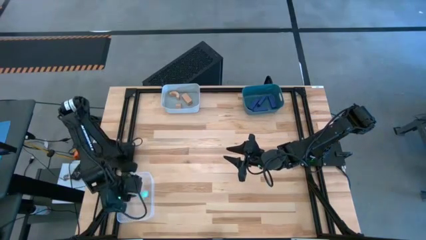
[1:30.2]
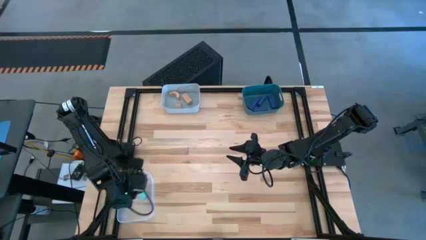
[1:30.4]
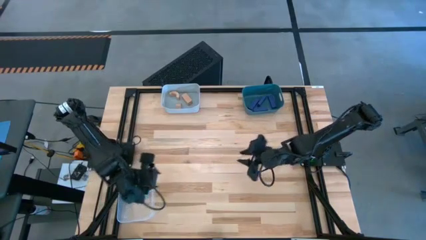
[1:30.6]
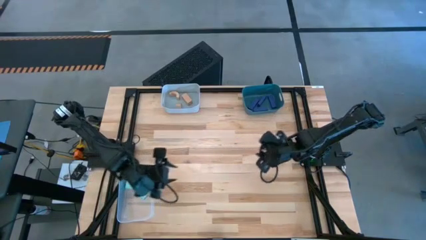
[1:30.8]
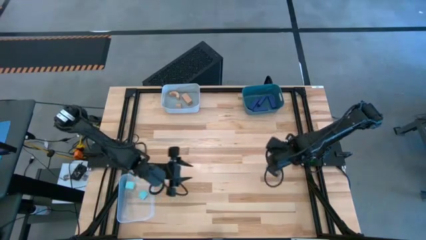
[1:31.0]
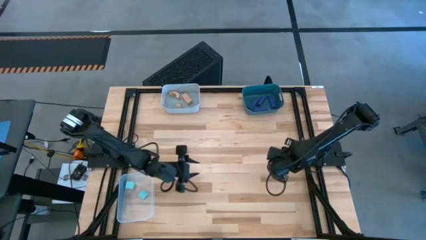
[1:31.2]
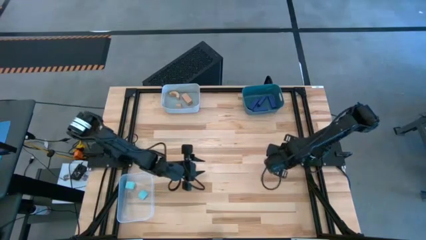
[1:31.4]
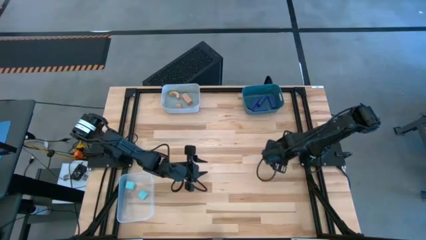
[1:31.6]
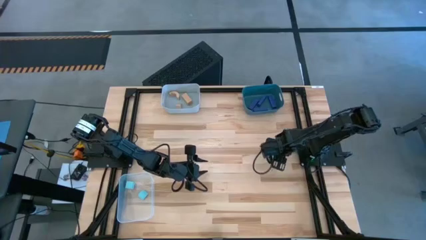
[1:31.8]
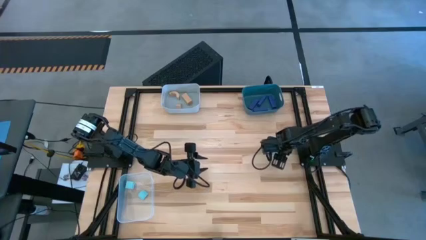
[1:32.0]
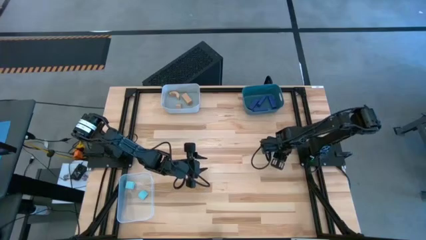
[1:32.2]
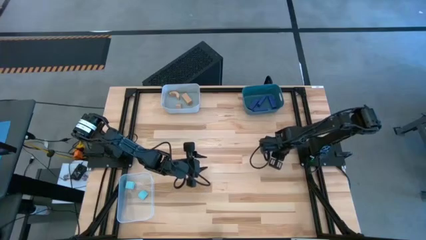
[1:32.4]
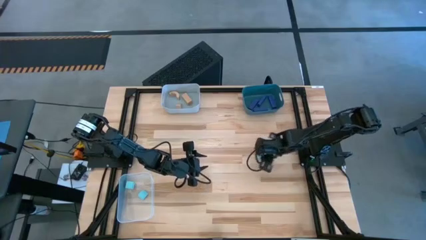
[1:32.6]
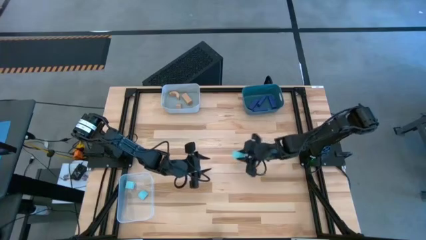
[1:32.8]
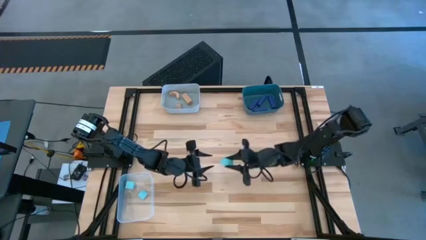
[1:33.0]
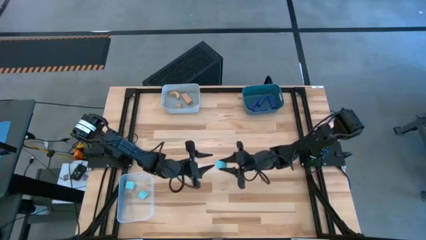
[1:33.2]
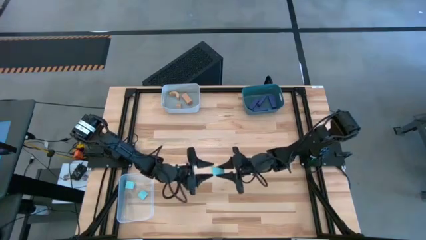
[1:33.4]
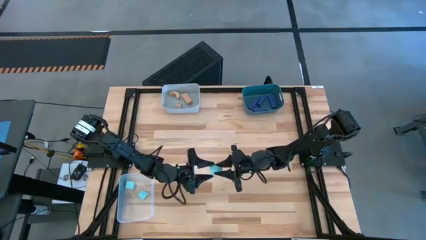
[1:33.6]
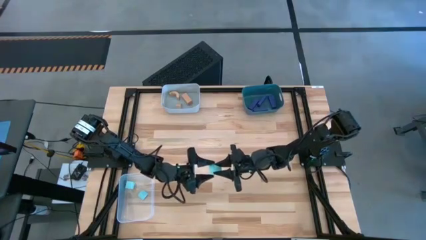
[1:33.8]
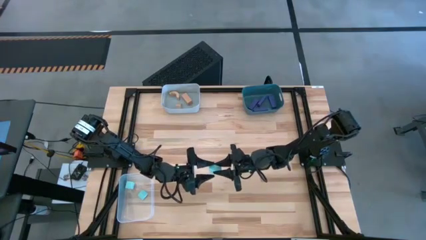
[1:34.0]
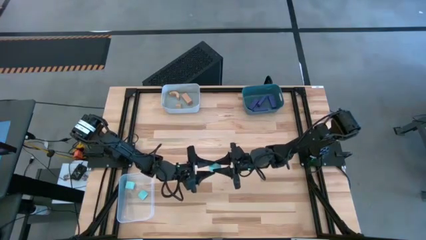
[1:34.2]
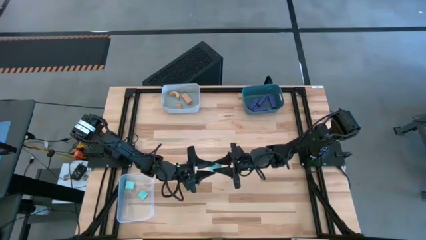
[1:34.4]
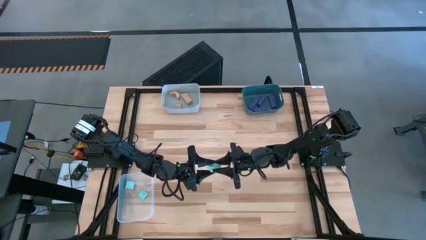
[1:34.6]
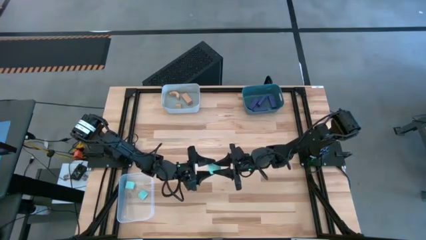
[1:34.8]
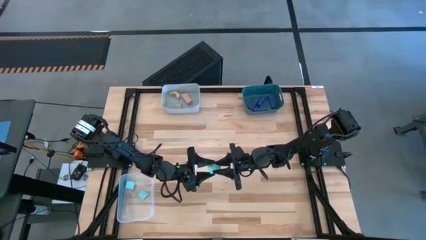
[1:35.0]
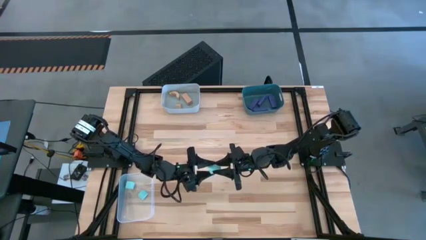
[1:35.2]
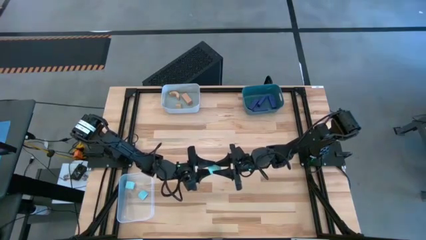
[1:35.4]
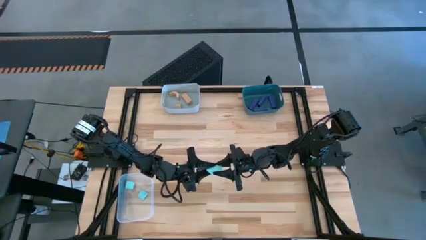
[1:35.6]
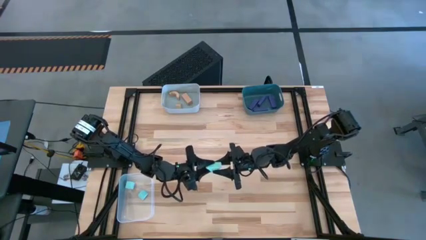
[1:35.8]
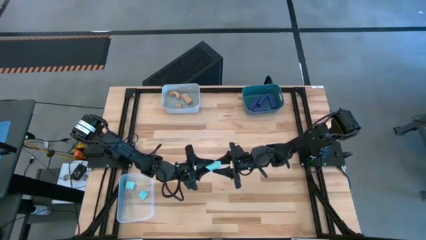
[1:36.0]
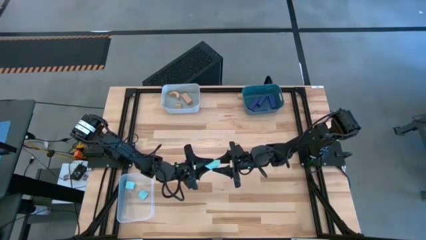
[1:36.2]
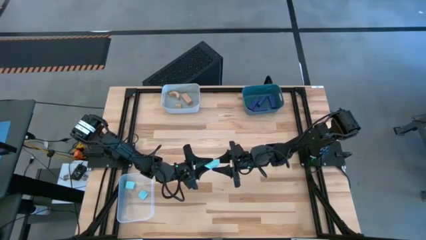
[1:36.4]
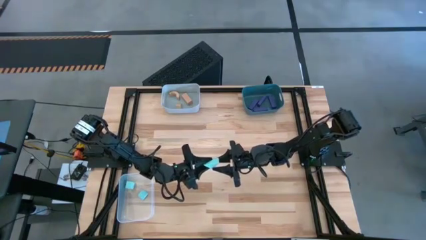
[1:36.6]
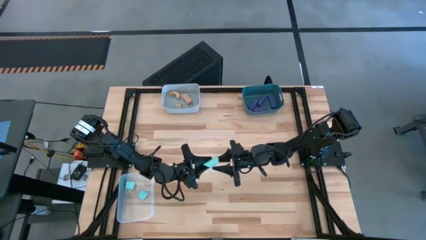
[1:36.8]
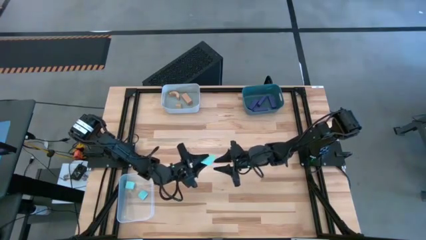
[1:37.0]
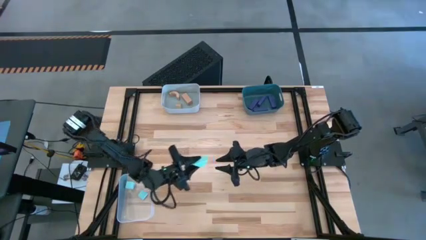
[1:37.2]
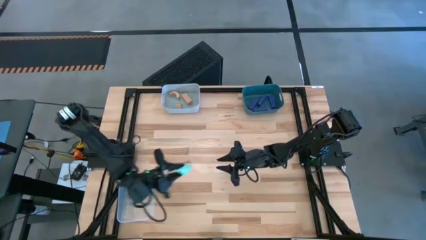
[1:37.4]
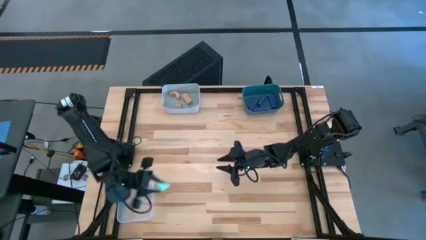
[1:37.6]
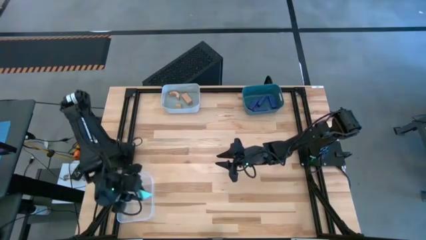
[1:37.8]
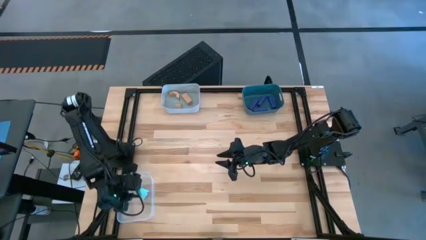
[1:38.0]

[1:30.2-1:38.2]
Task: Sort & place blocks by color
Put the light blue block into the transparent bin

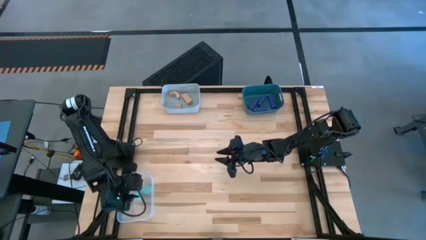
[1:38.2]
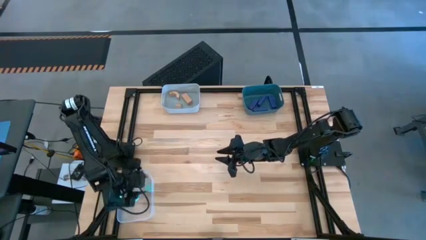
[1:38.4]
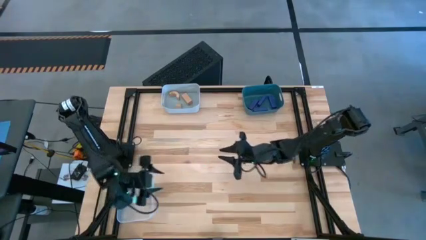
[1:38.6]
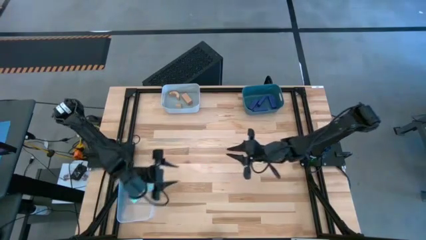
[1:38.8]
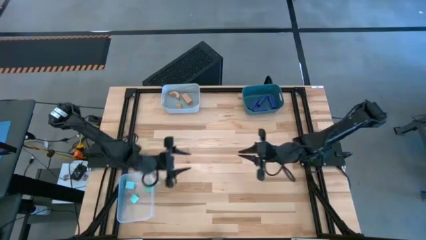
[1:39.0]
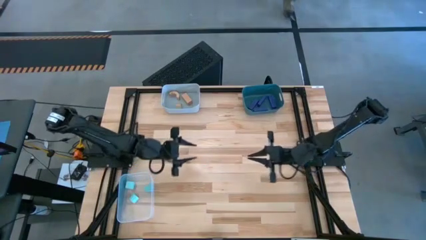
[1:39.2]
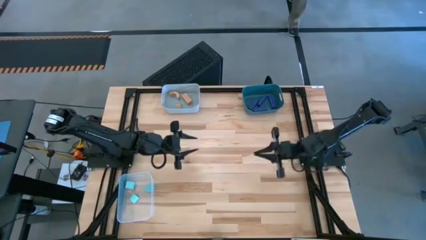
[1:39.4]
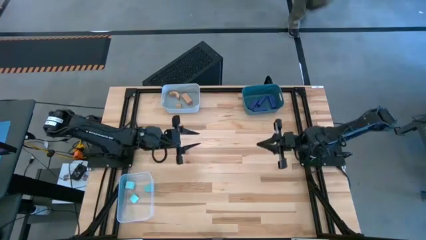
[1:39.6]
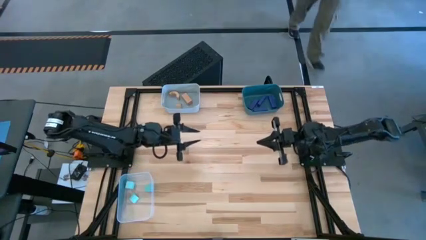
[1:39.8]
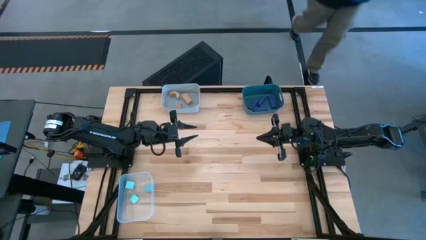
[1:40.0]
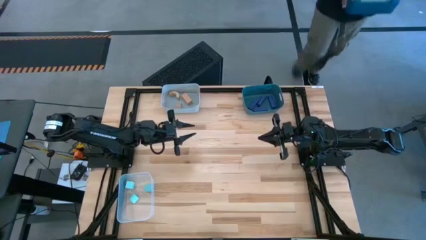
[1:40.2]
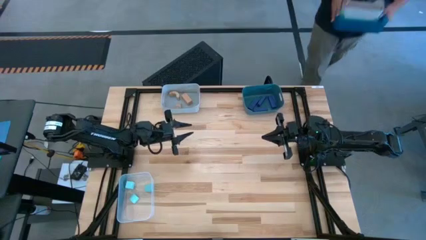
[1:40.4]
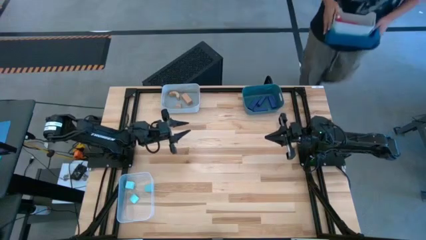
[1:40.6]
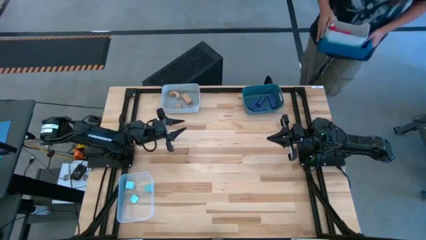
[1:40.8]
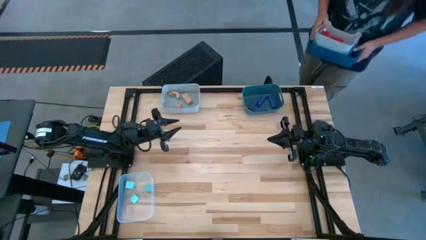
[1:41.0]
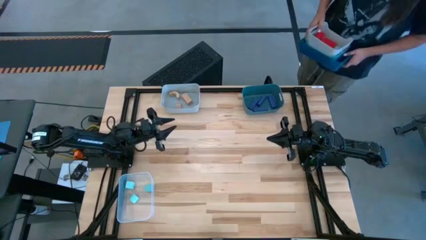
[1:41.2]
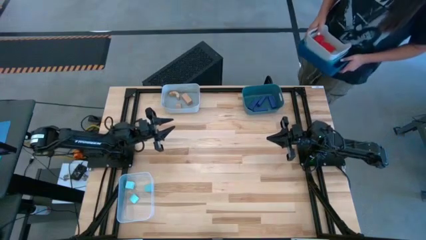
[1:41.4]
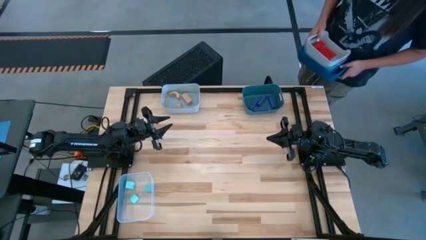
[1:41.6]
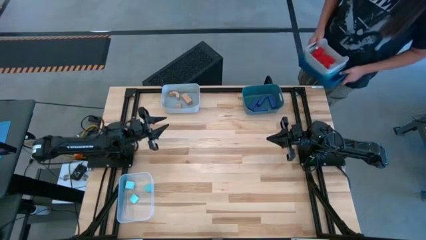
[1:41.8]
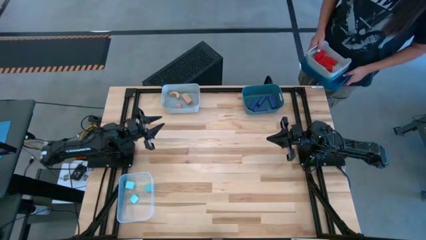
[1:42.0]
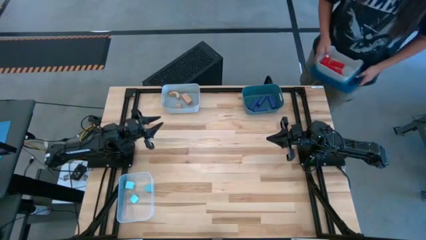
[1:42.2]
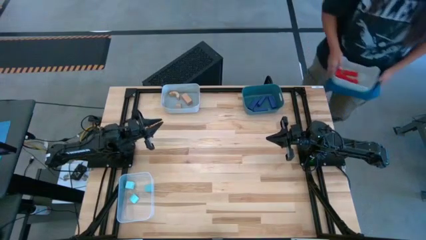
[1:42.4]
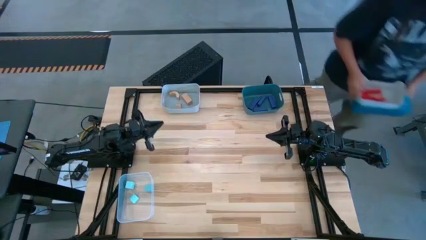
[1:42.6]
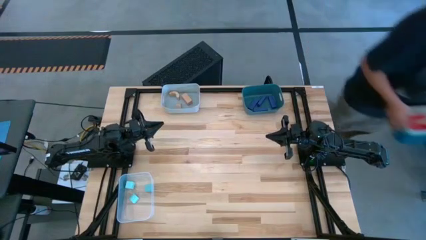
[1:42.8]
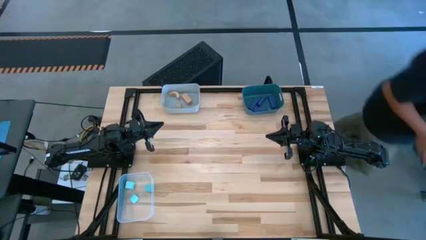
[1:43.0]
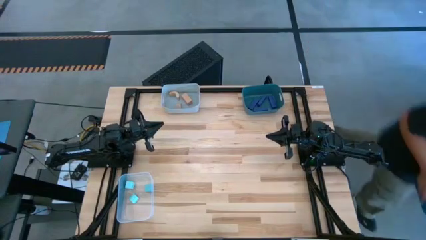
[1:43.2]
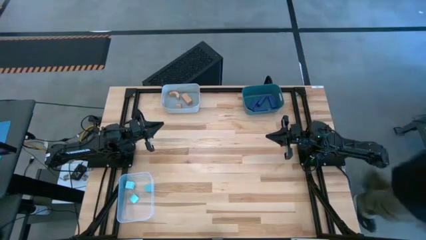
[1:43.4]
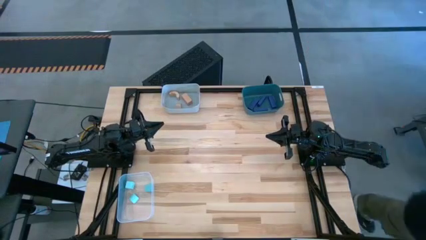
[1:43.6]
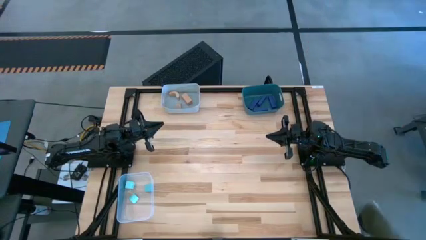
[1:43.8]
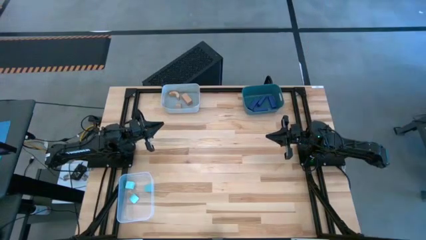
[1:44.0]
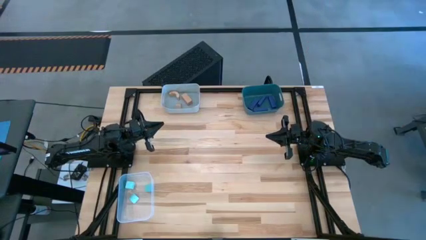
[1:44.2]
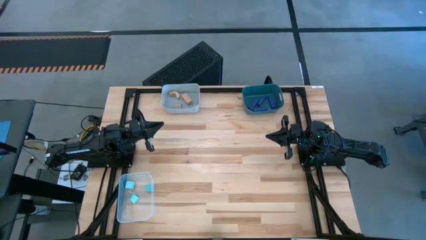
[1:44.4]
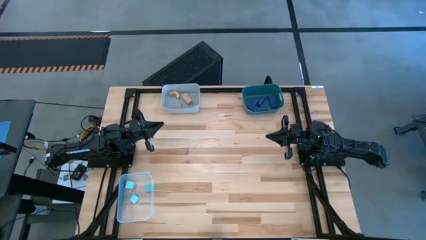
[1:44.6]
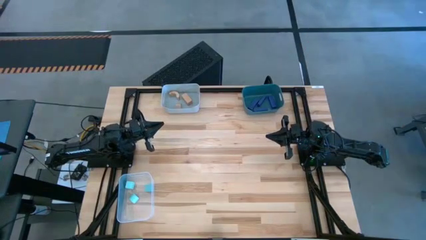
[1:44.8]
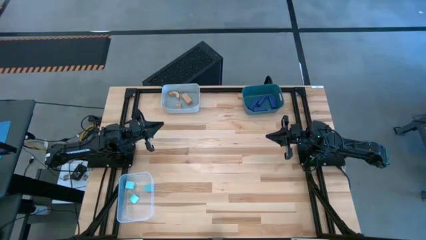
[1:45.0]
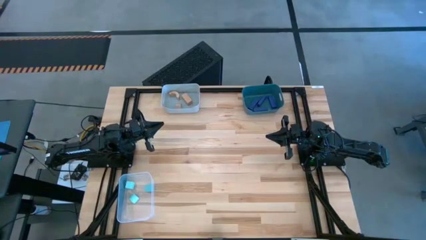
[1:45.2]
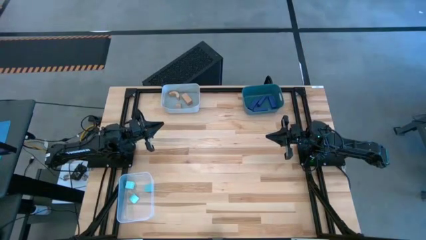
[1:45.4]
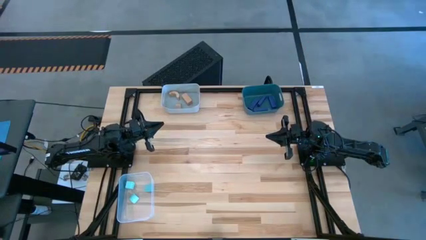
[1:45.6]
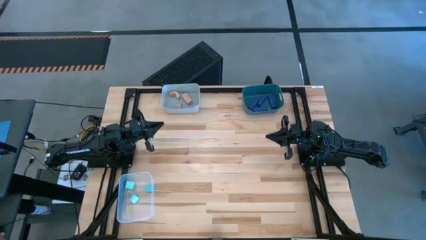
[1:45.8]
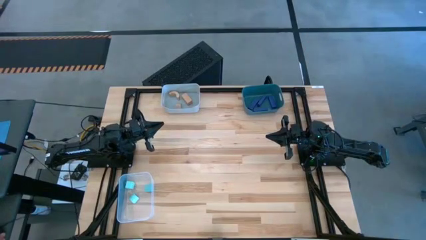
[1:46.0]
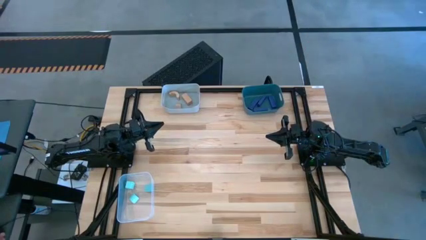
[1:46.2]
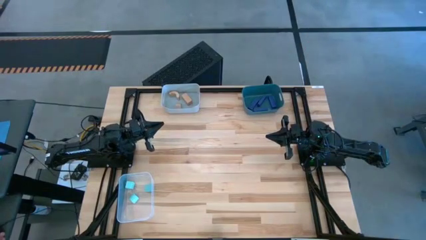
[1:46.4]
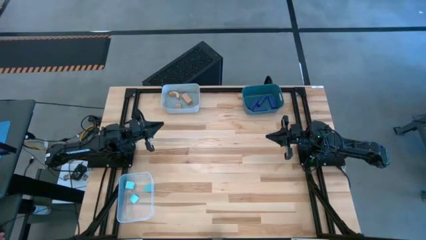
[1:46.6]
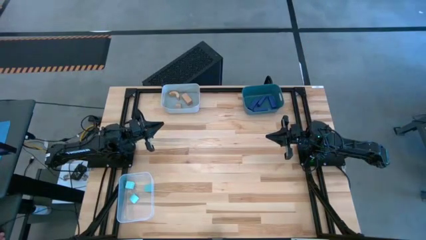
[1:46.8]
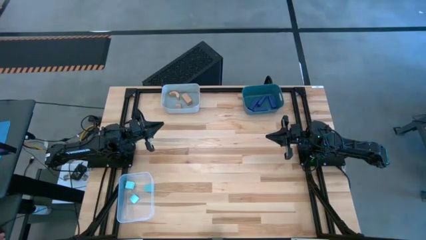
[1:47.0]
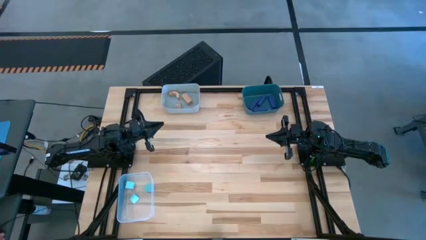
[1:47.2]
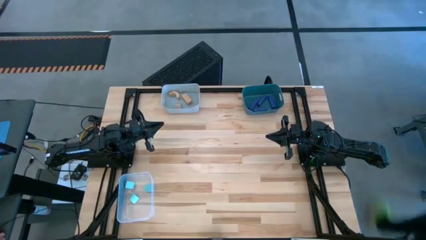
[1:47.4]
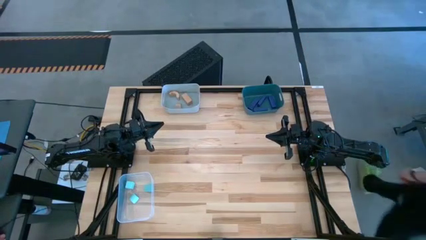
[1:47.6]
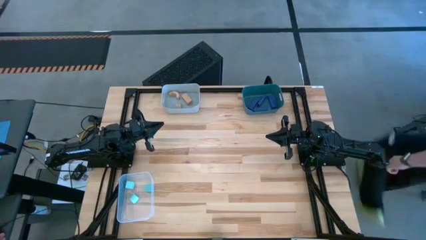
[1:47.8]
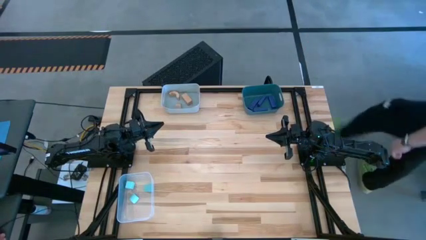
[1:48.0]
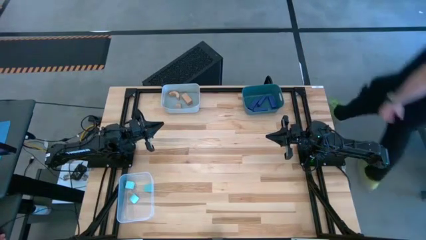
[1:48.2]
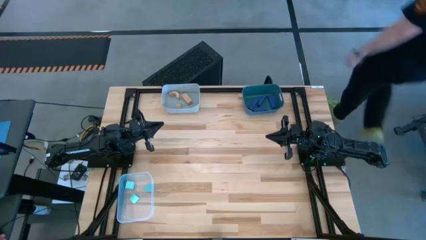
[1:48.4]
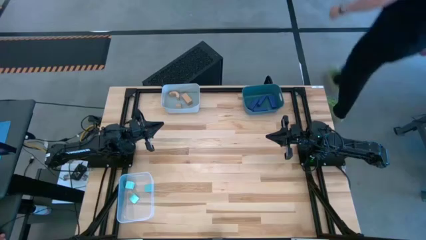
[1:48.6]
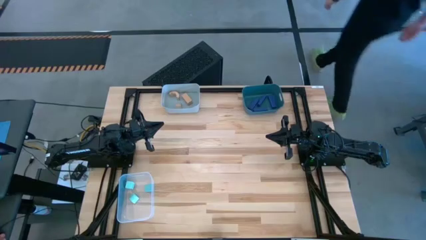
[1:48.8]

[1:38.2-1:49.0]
Return to Home Position
